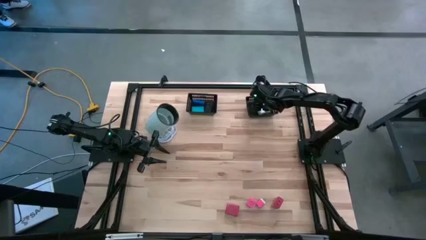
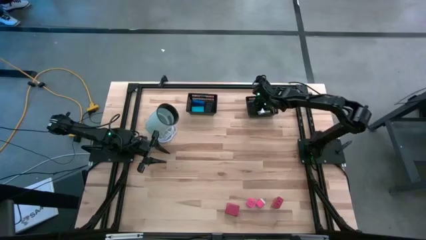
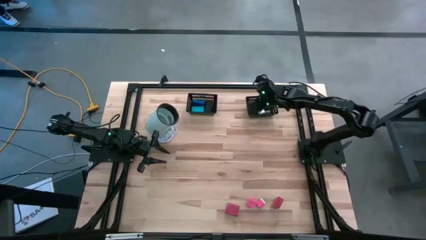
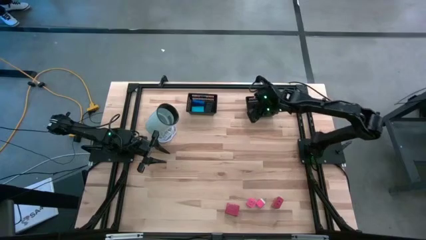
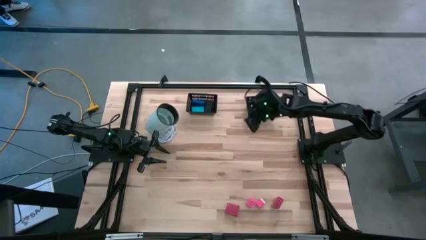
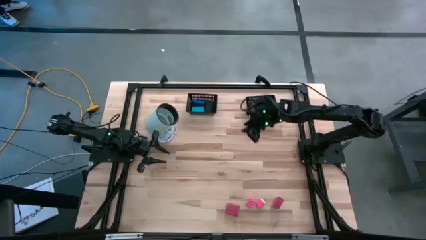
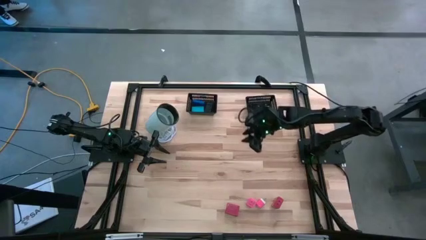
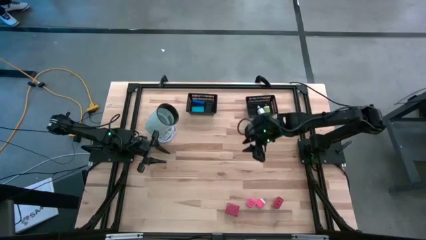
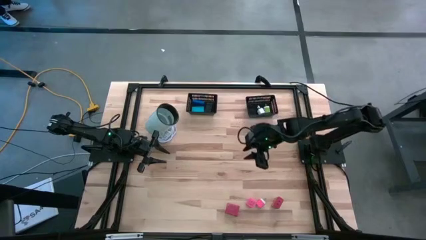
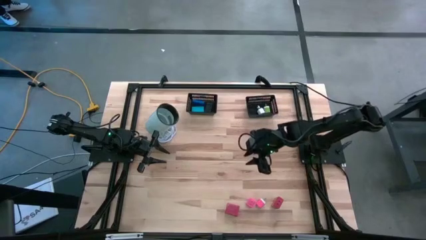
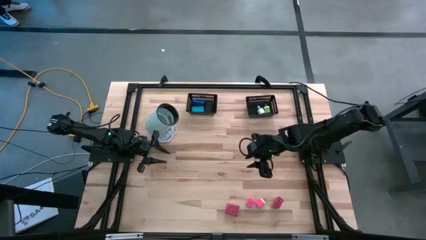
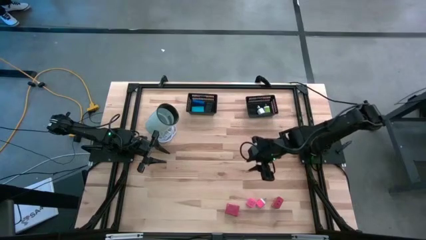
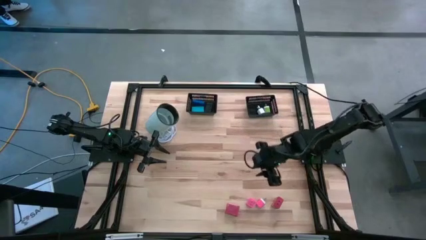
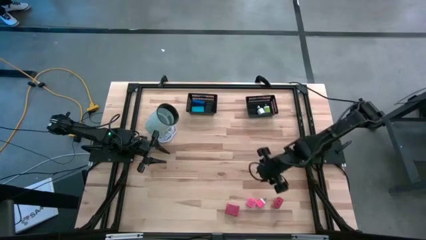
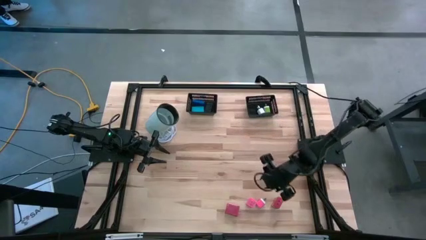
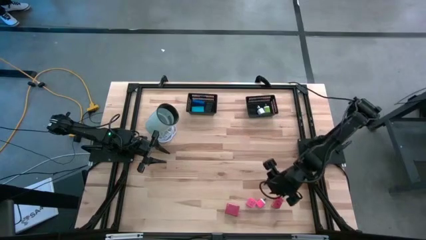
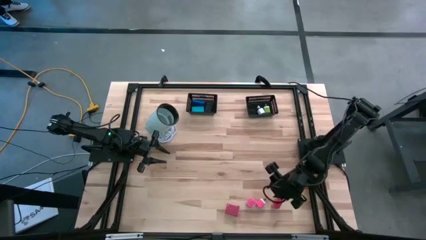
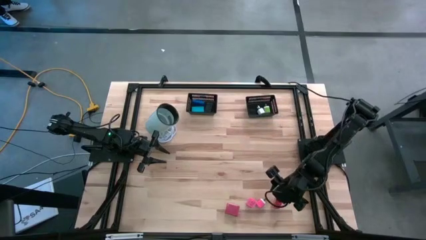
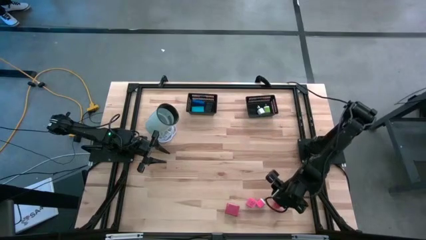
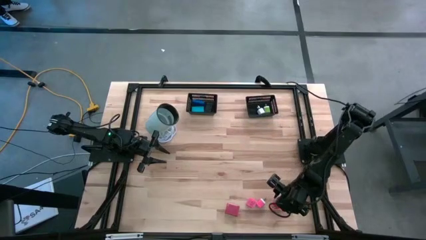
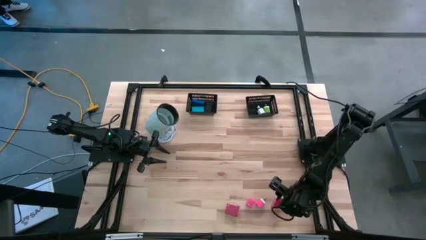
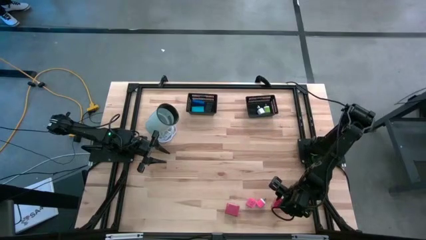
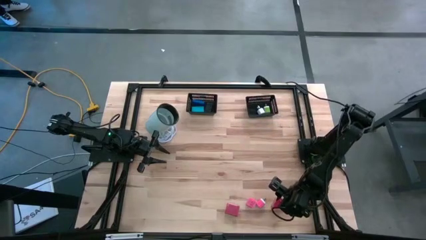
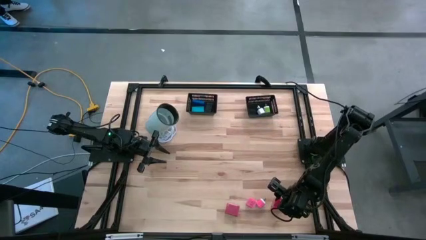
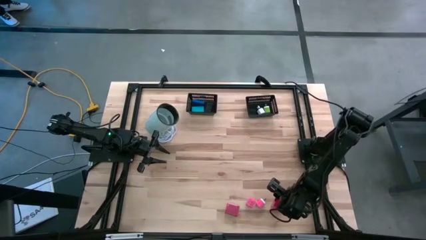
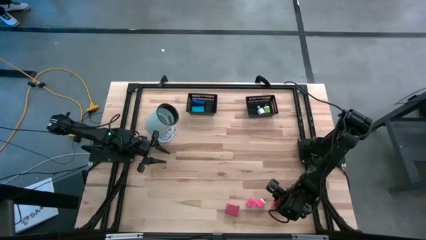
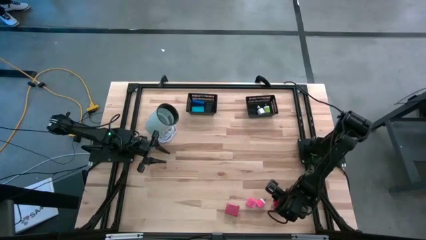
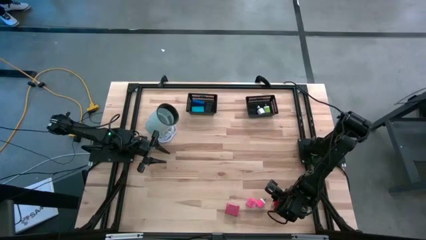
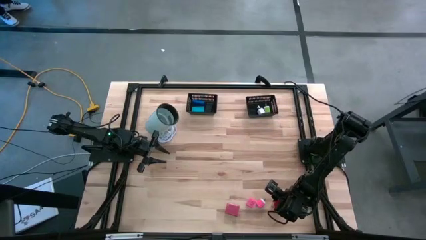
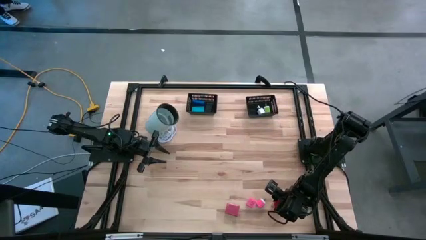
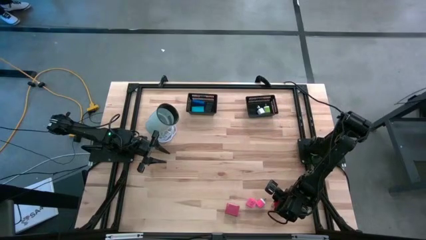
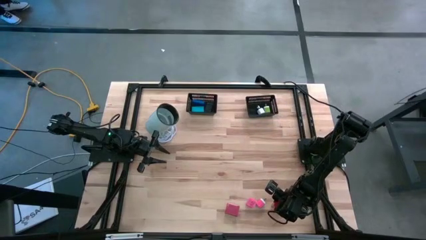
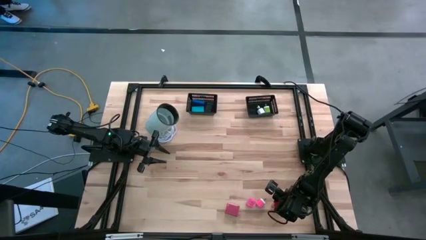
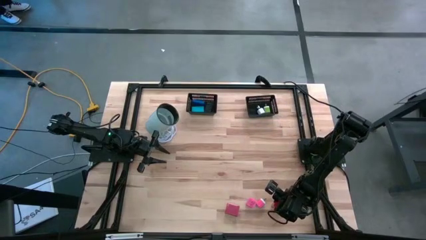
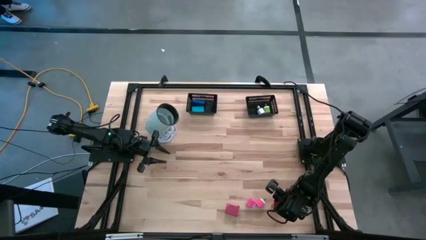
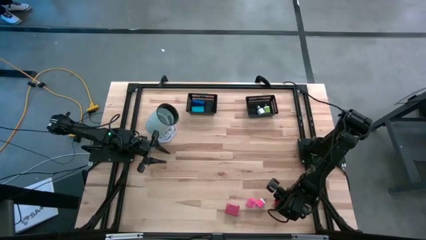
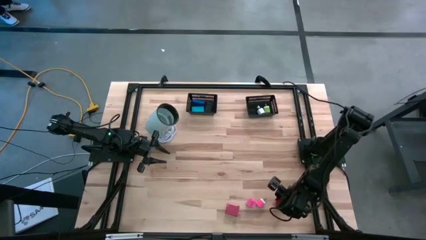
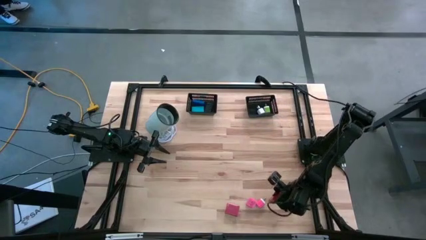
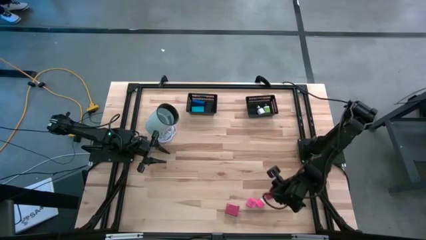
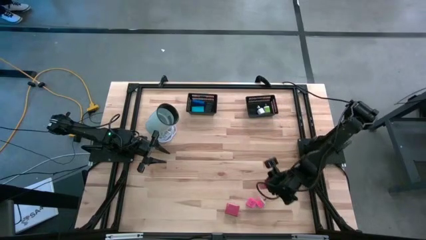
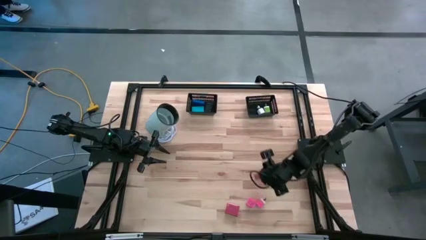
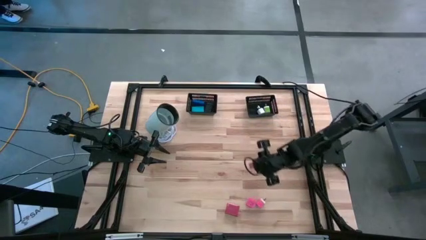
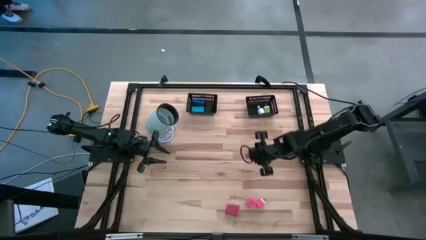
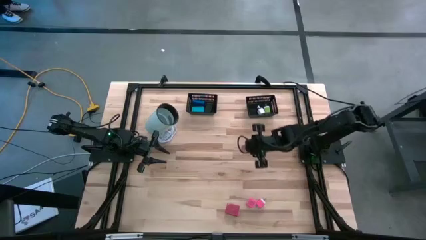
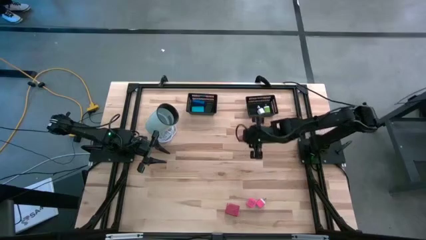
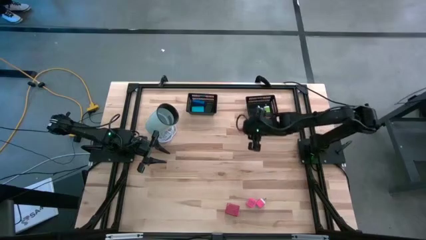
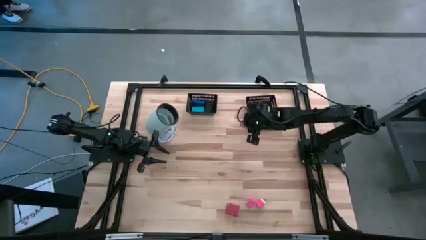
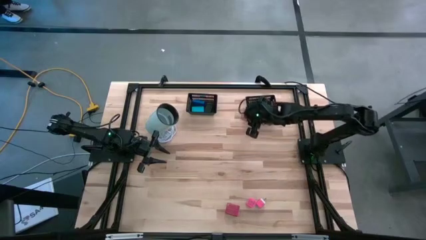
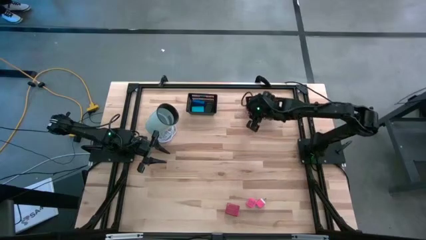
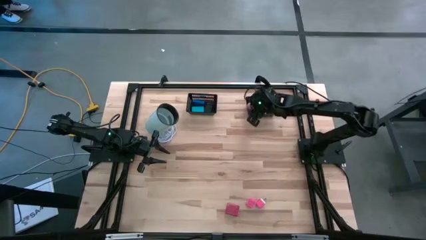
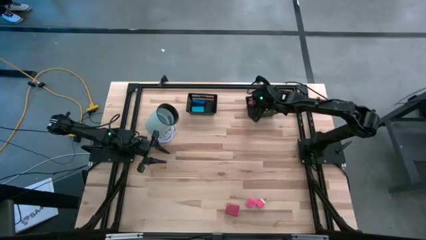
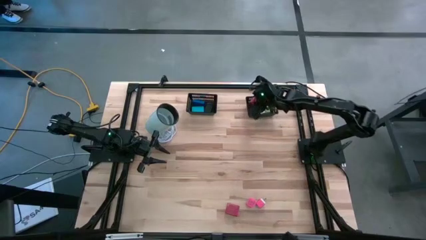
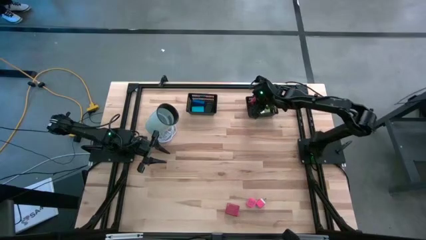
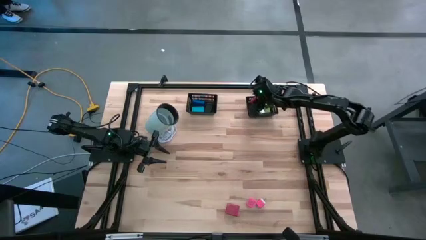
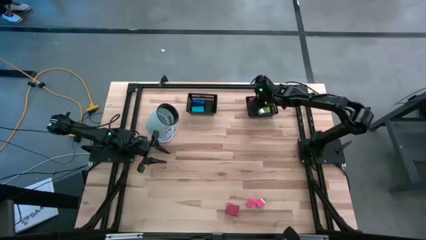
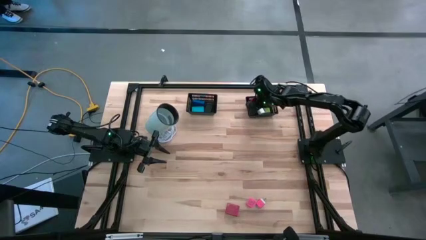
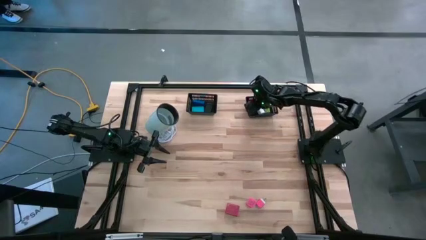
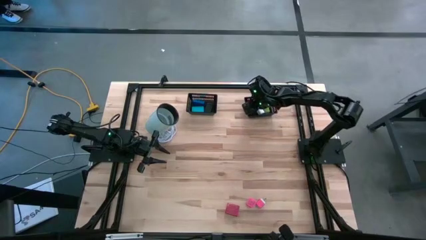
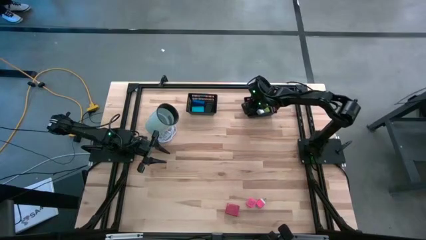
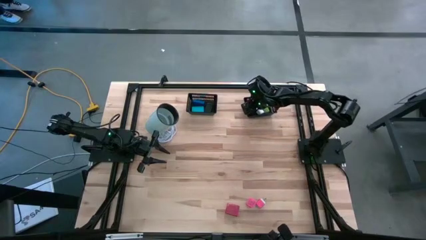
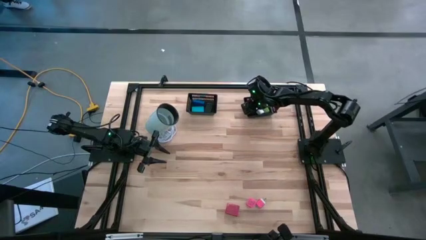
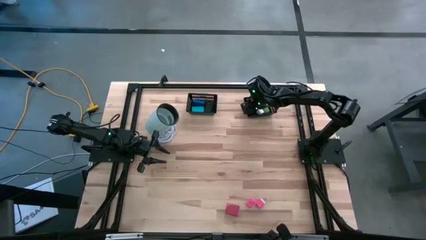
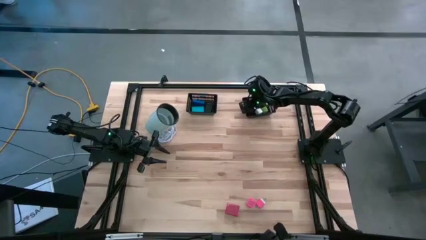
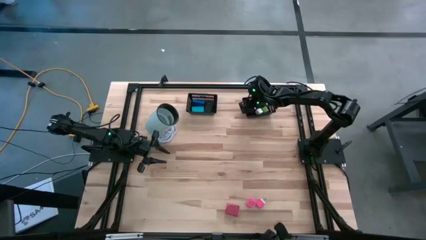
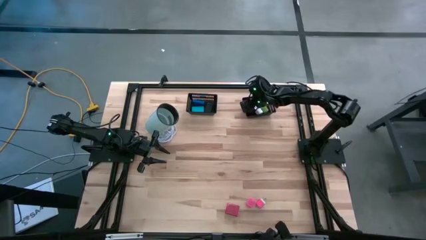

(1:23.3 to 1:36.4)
Task: Pick & Place Office items
Put the red charger adapter into the right black bin
